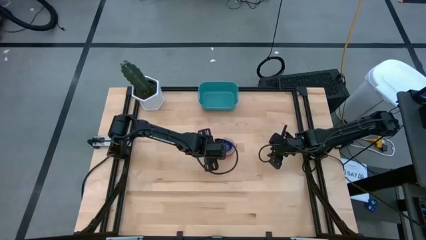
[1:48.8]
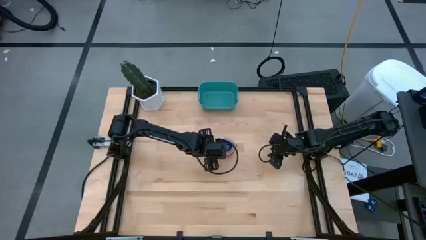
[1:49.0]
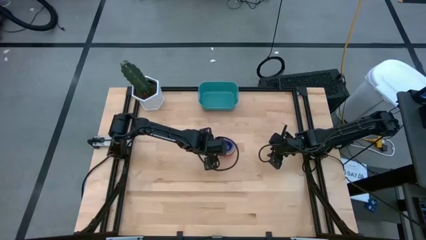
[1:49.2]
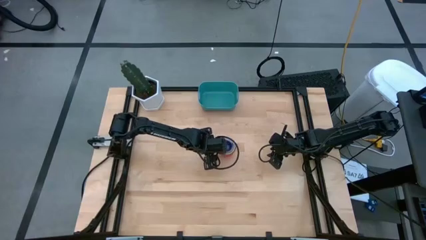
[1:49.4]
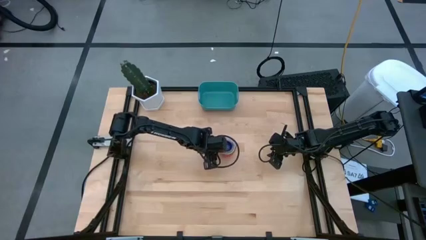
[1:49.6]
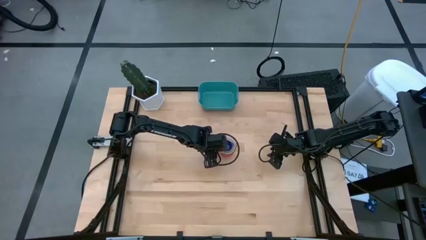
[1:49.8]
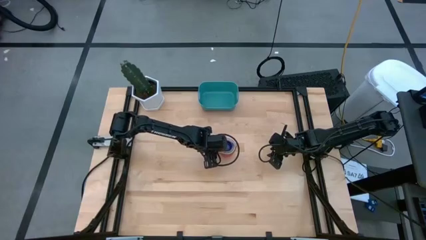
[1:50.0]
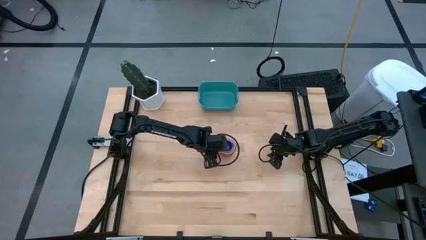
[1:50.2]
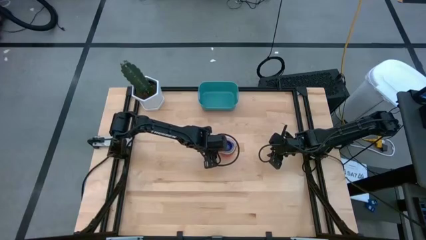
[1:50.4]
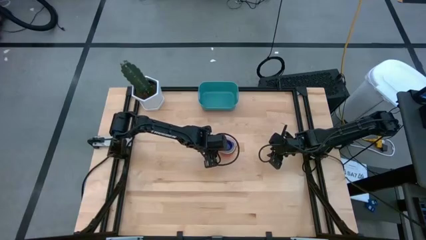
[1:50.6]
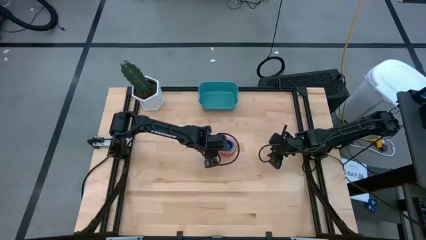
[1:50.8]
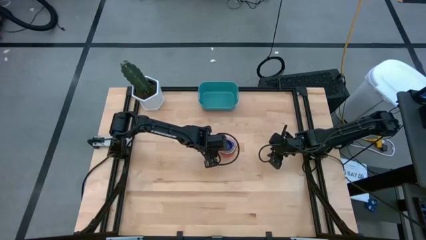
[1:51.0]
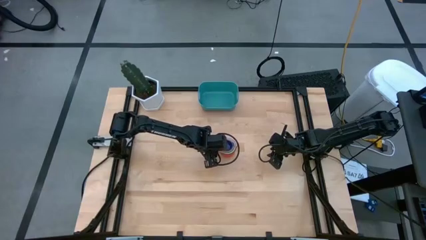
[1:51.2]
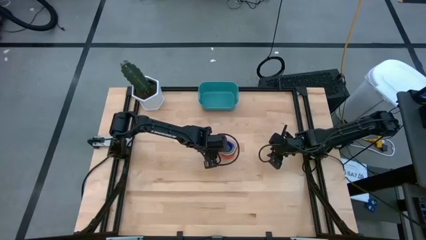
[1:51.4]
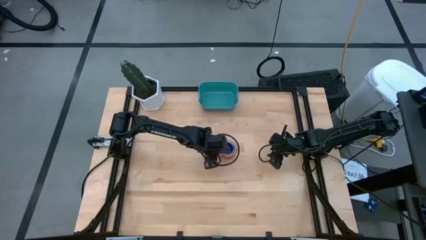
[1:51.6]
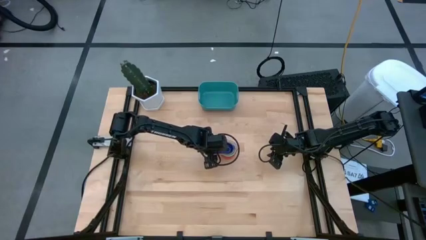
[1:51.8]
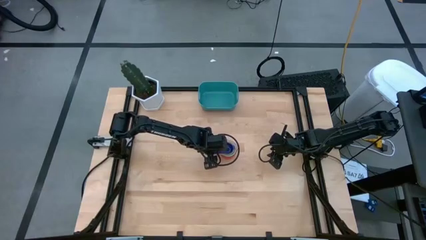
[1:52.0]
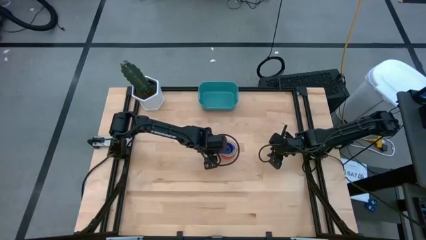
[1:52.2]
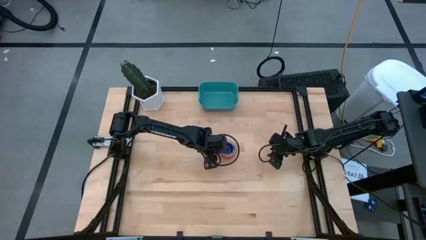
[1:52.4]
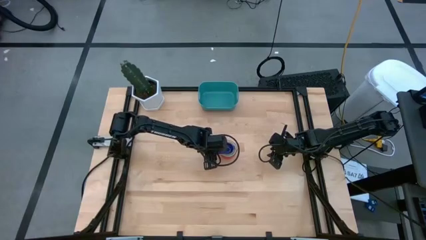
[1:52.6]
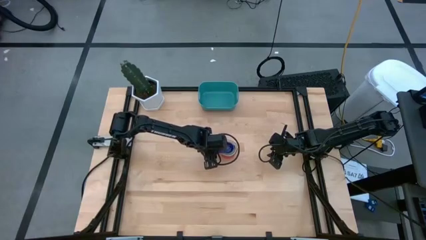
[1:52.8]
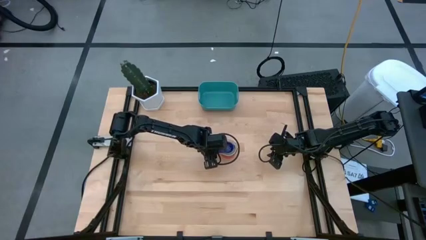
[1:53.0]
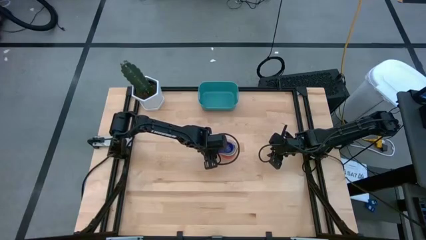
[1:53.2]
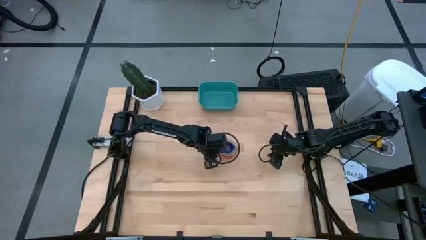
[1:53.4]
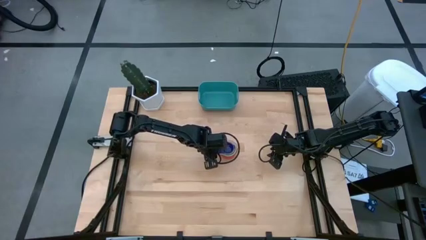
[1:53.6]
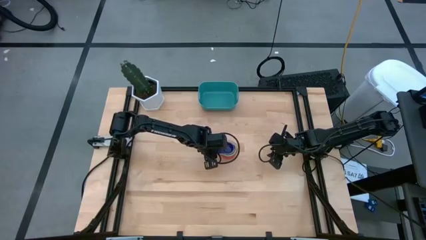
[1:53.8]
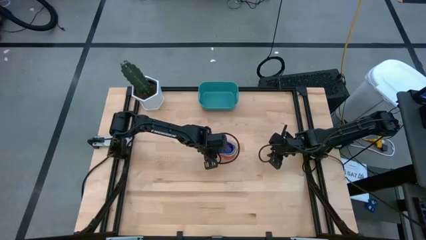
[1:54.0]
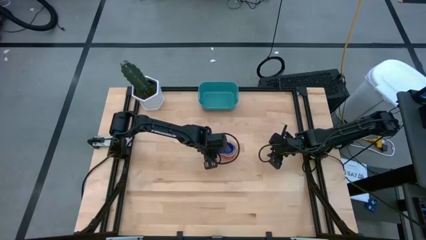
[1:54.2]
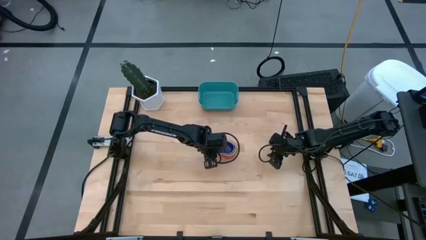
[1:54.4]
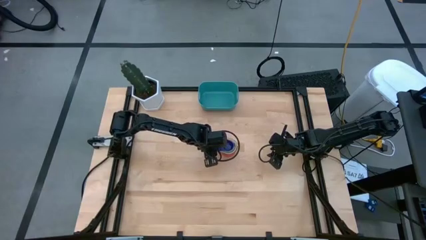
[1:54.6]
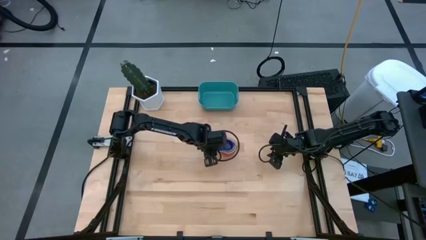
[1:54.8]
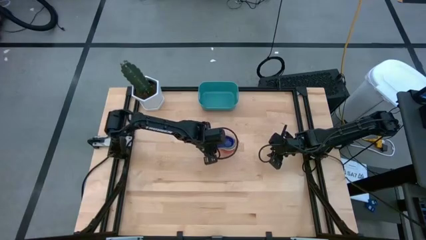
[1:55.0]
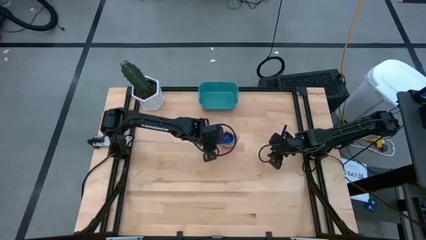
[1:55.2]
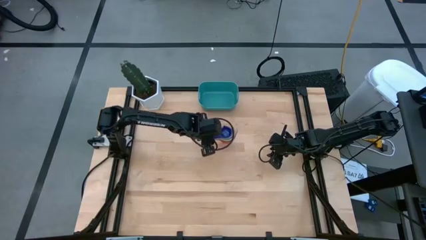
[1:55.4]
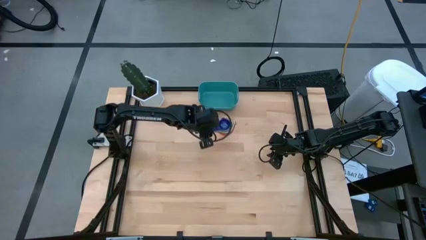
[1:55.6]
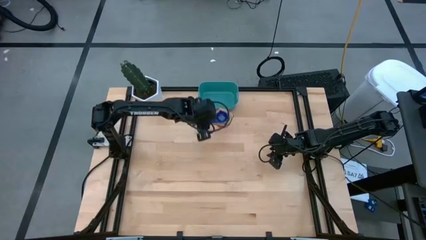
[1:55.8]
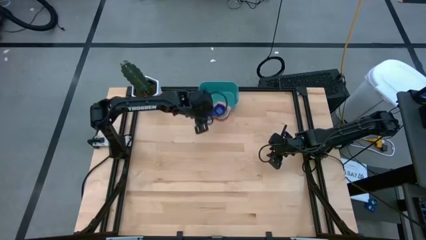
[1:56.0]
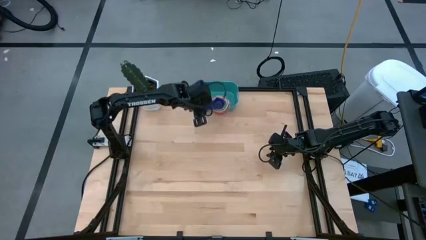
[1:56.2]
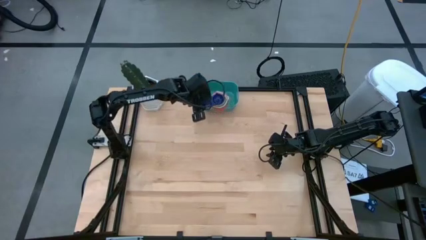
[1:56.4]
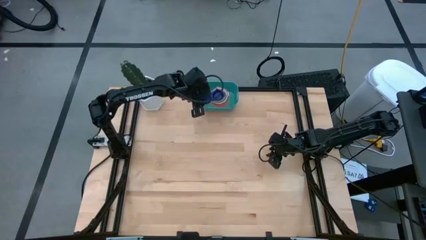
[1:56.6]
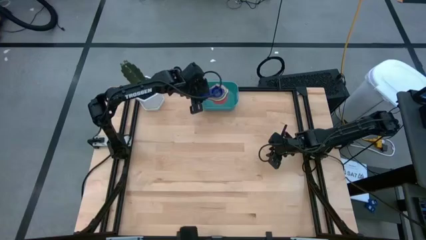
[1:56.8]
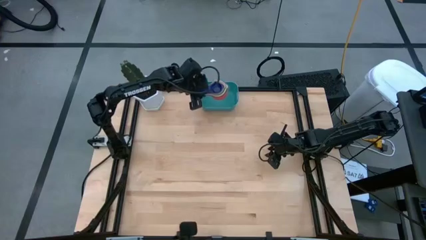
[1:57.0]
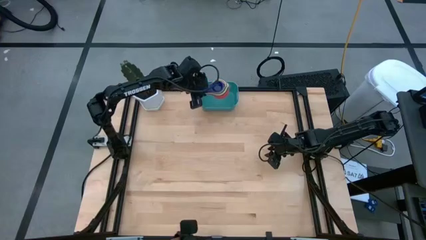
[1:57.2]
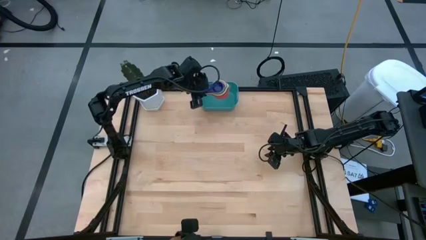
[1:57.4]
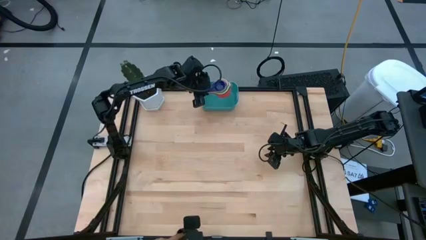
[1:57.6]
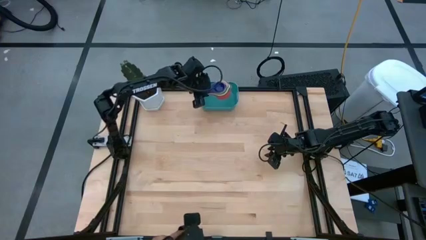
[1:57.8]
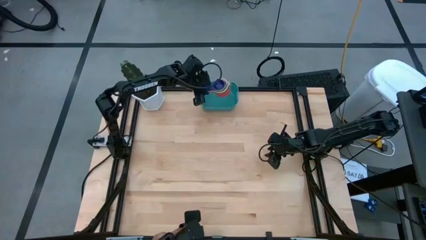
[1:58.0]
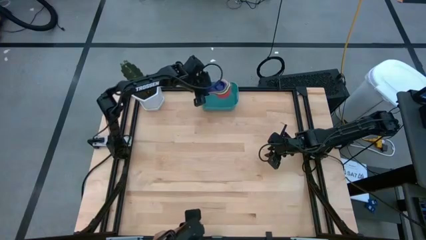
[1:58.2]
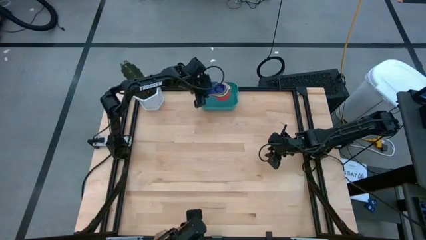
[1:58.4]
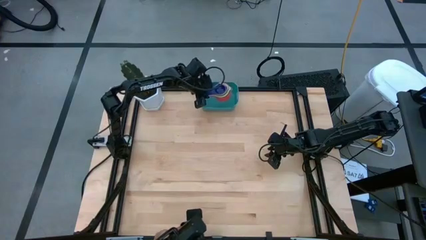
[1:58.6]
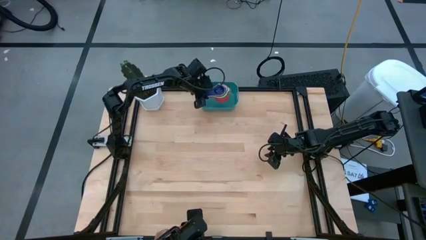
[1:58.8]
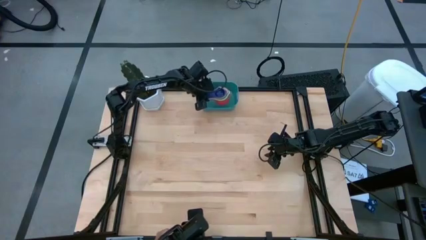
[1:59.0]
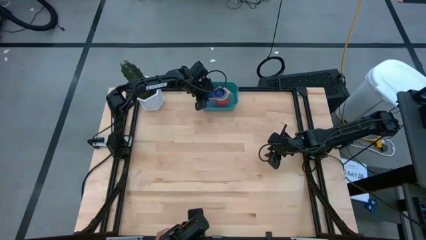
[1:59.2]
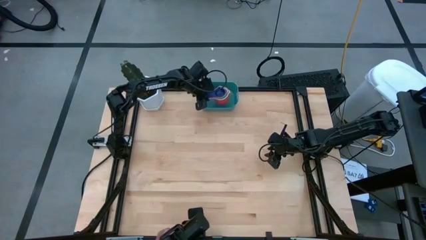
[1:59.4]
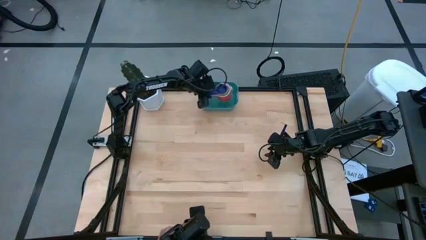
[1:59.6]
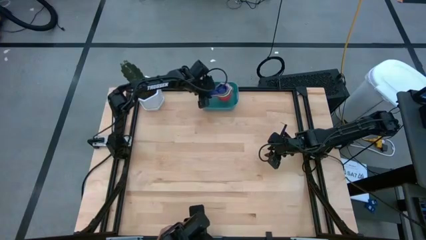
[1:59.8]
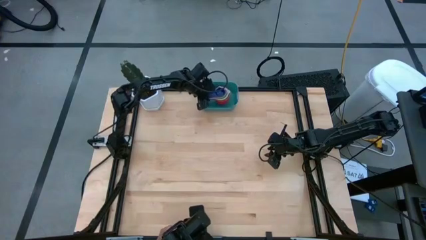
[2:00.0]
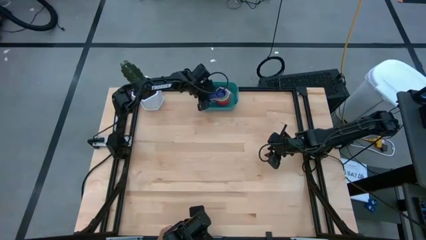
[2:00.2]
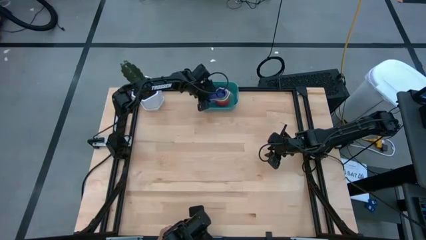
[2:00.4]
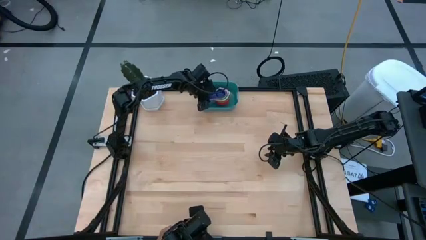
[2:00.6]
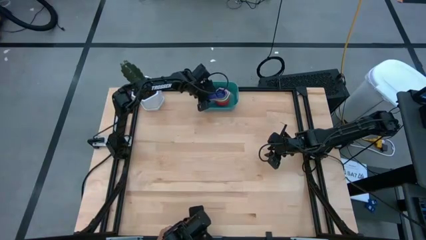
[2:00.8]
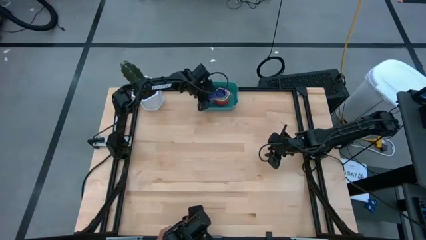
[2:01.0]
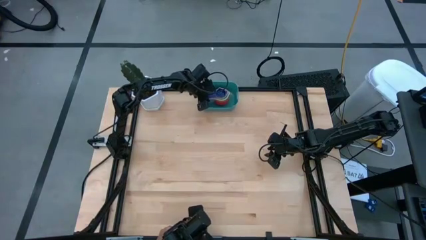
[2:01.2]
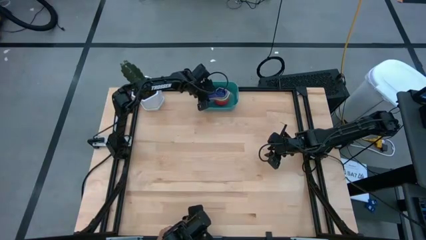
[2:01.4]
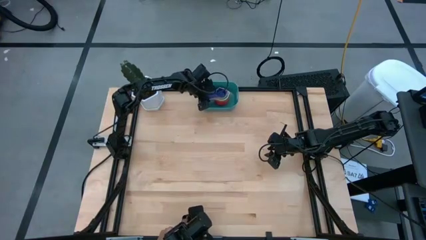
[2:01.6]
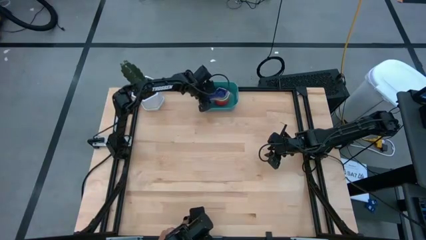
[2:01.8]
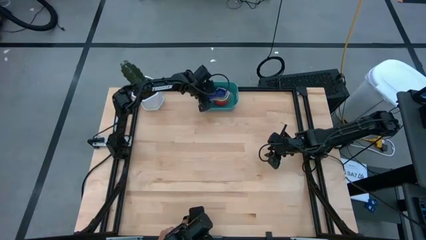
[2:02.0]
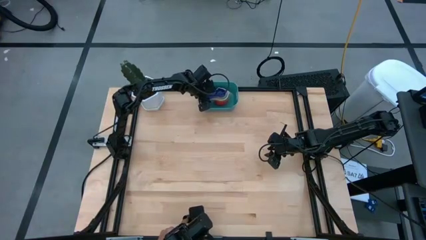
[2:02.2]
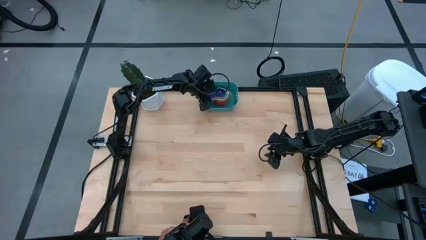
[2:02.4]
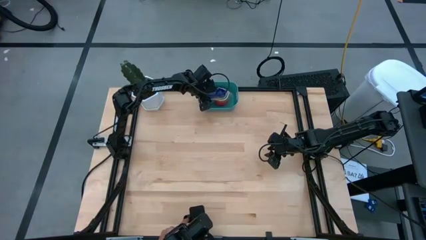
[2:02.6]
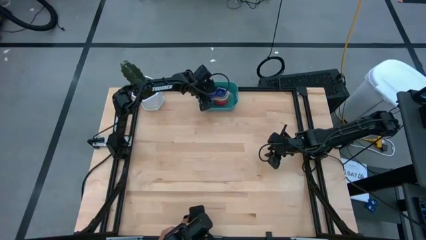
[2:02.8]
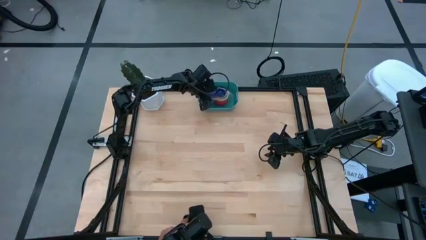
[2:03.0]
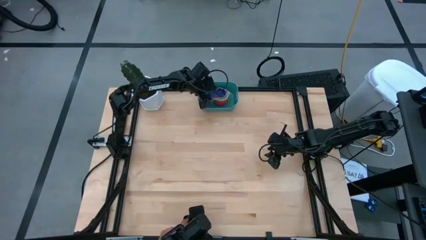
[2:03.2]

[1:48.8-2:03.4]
Task: Nest measuring cups in basket
Put the stacked measuring cups into the light green bin

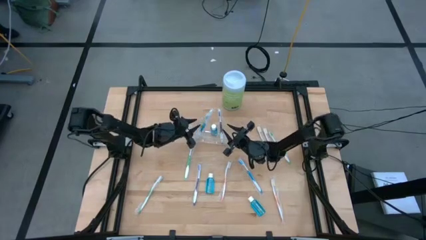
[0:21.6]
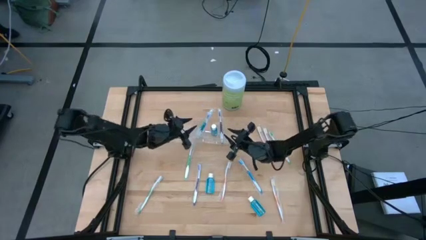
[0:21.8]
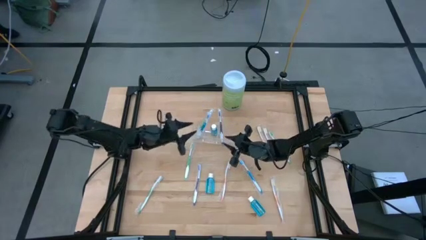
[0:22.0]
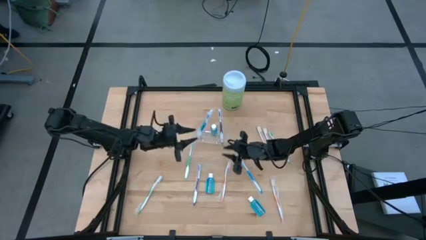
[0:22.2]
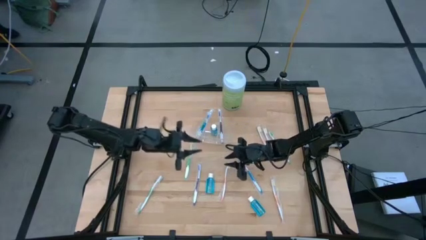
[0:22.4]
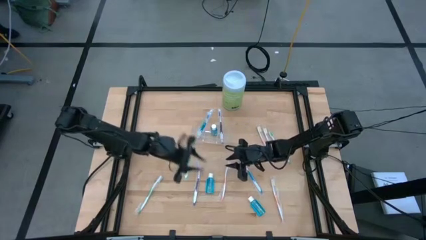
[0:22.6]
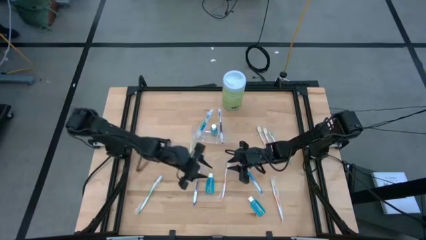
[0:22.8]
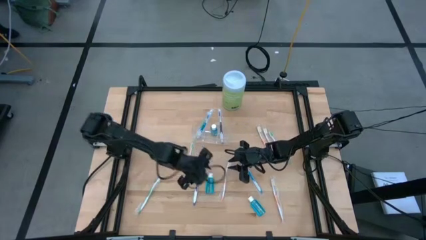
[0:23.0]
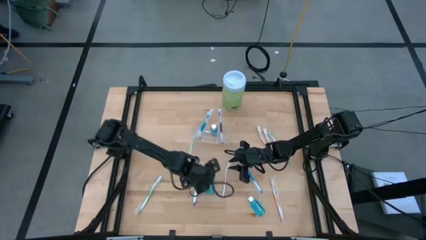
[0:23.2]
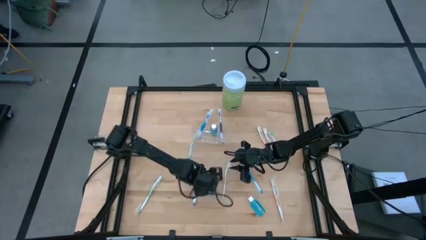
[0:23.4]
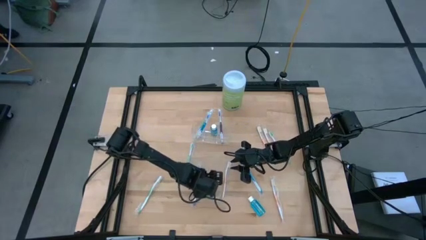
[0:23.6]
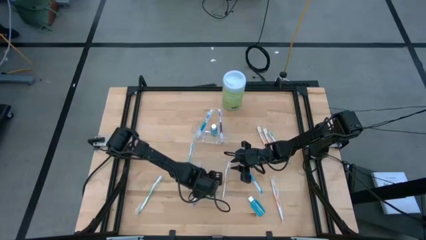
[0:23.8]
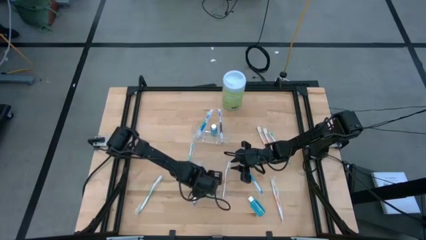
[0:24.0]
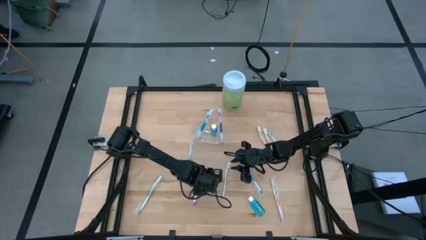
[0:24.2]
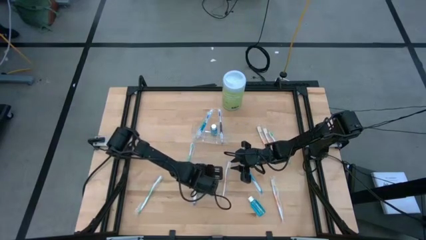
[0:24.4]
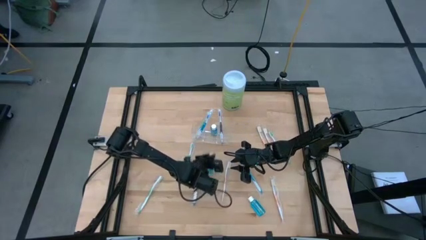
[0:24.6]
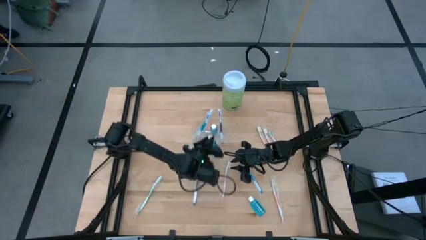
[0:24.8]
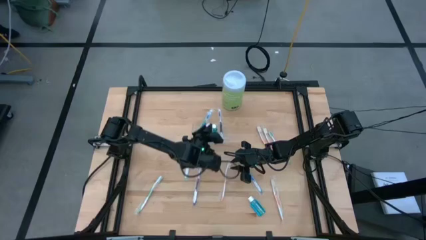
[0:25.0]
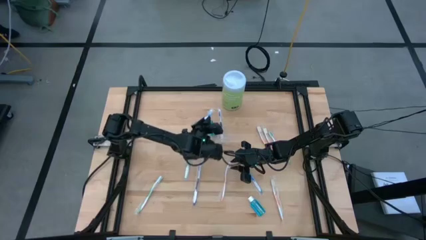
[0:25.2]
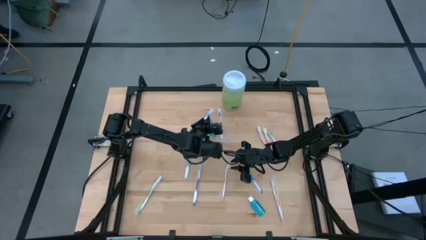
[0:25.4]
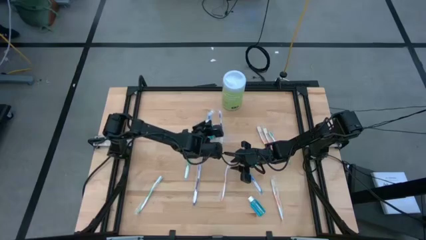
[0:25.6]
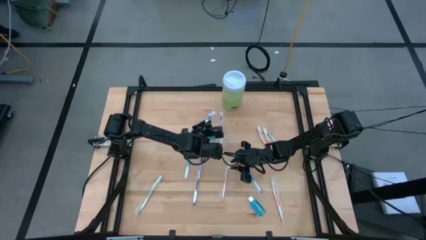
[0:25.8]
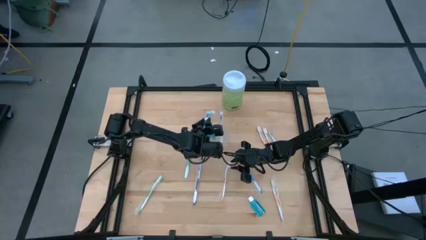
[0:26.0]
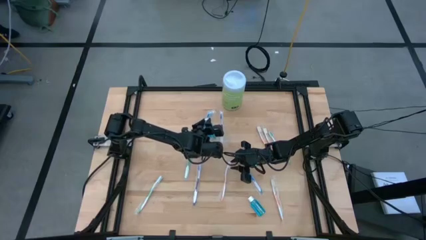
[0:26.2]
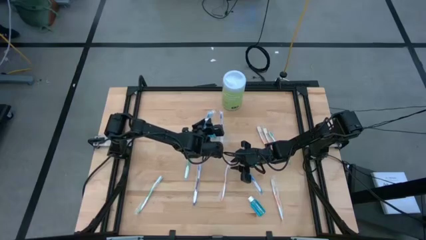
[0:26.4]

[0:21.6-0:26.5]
Task: Pick & Place toothbrushing station
Put the blue mouthwash into the transparent organizer
